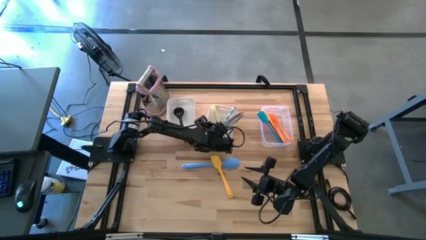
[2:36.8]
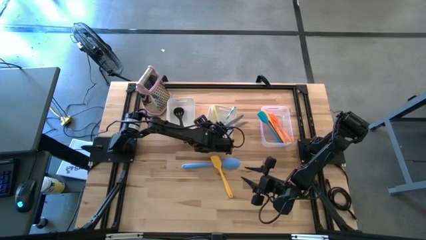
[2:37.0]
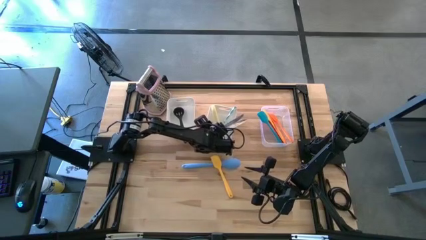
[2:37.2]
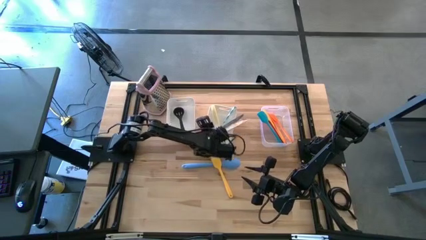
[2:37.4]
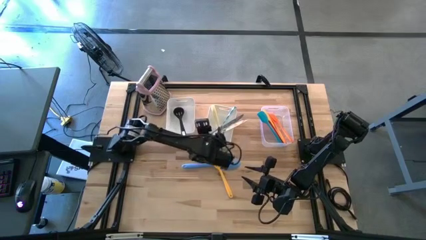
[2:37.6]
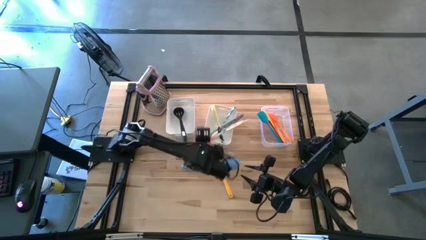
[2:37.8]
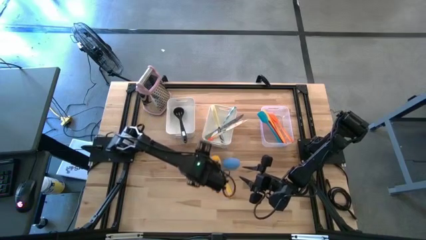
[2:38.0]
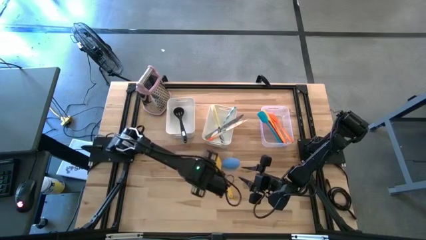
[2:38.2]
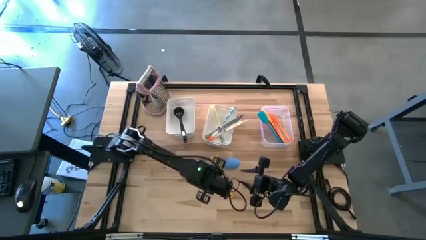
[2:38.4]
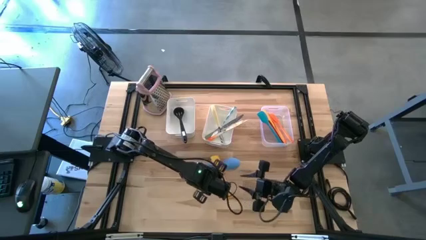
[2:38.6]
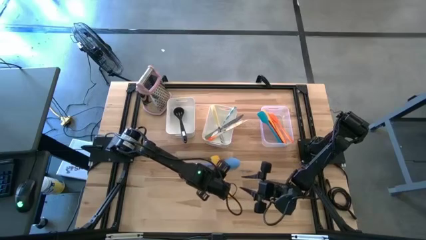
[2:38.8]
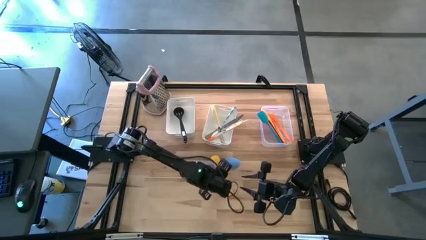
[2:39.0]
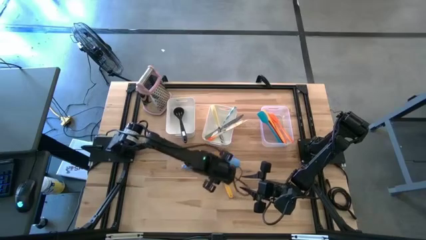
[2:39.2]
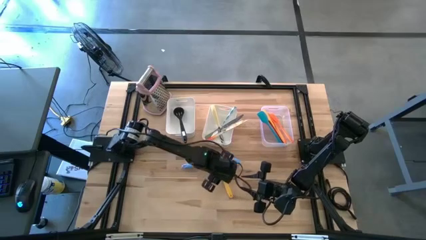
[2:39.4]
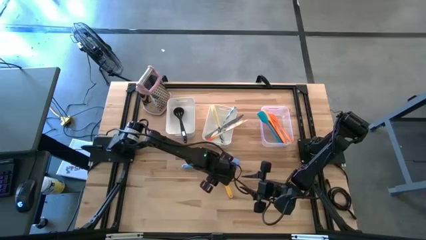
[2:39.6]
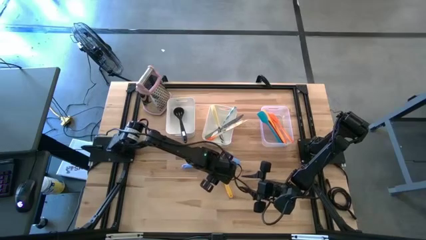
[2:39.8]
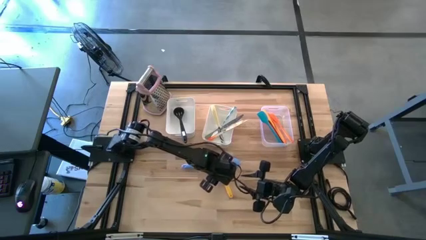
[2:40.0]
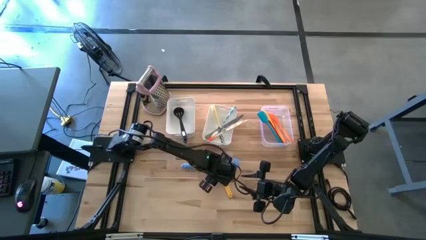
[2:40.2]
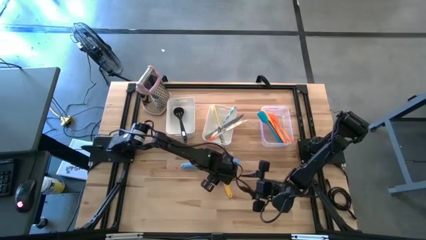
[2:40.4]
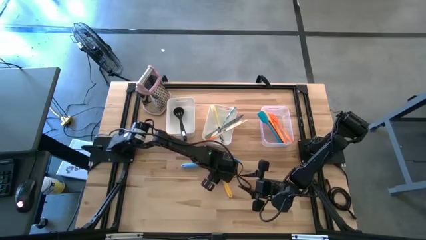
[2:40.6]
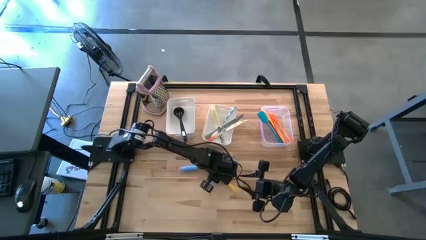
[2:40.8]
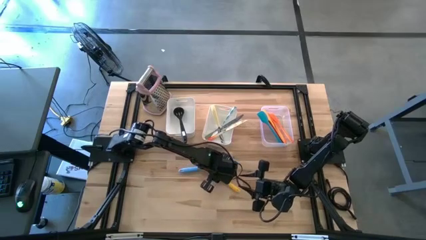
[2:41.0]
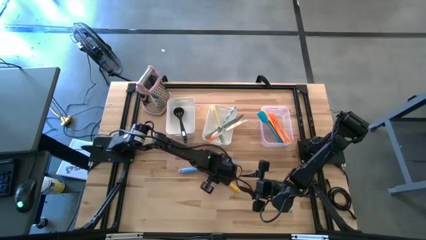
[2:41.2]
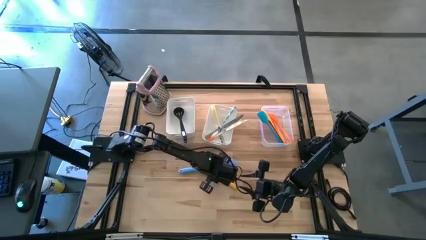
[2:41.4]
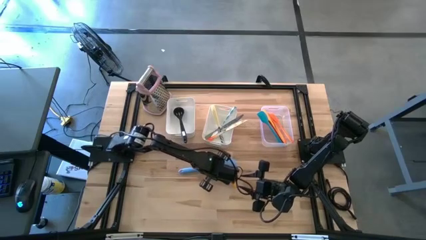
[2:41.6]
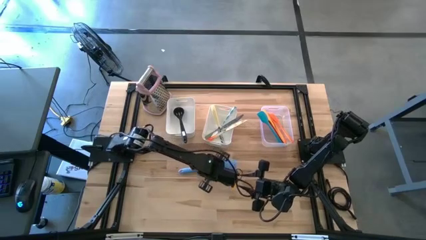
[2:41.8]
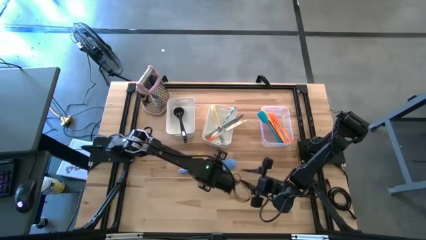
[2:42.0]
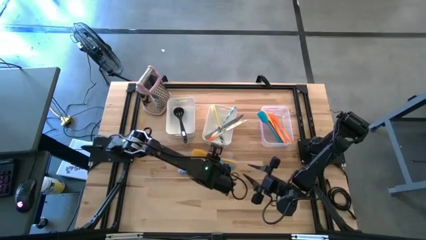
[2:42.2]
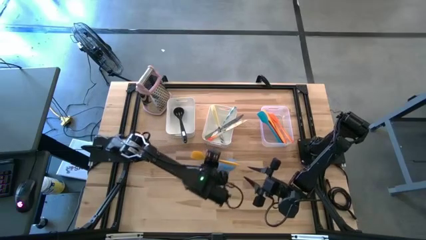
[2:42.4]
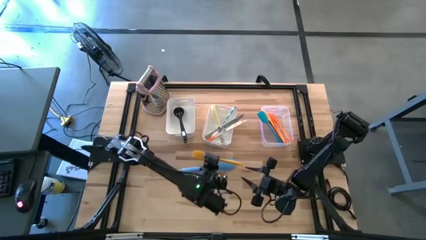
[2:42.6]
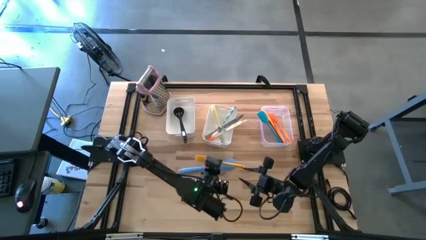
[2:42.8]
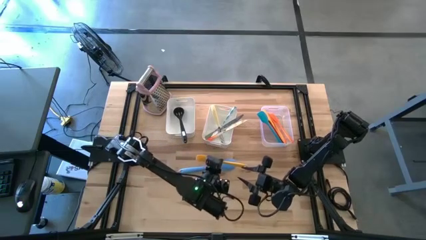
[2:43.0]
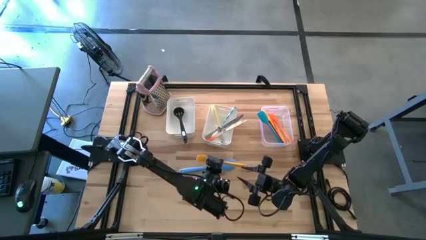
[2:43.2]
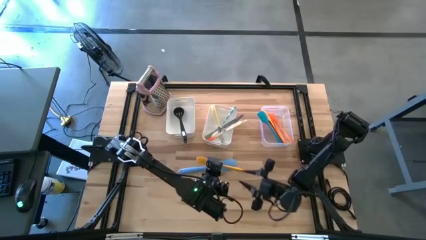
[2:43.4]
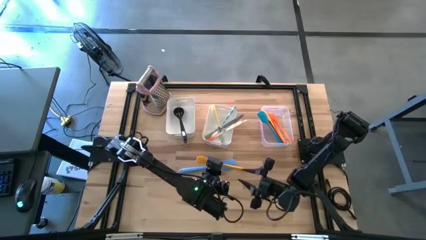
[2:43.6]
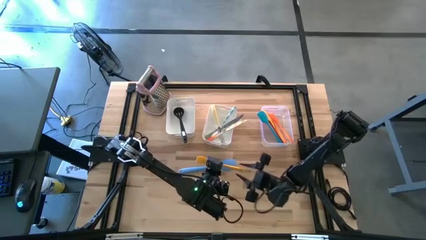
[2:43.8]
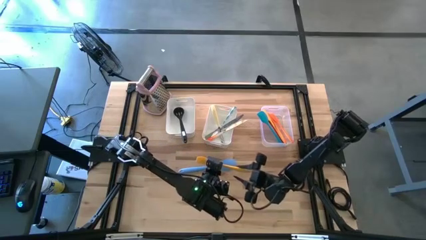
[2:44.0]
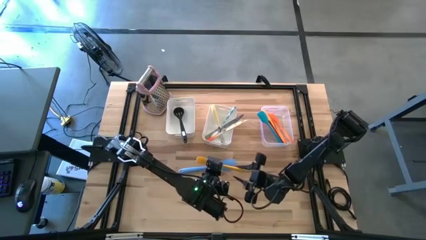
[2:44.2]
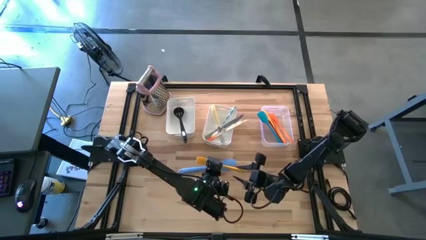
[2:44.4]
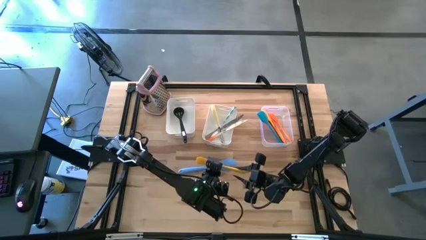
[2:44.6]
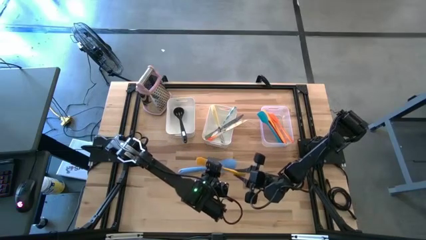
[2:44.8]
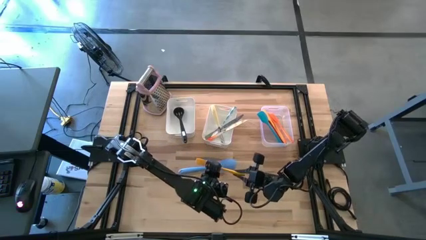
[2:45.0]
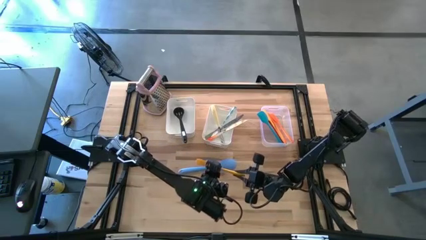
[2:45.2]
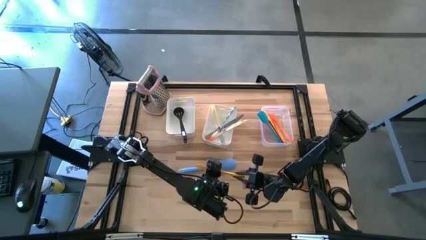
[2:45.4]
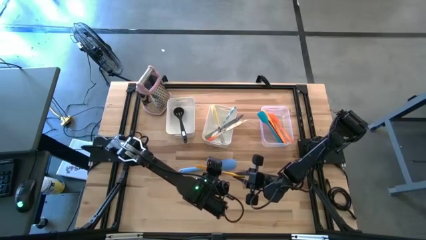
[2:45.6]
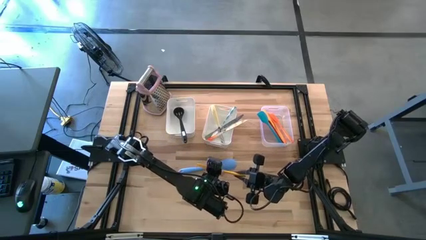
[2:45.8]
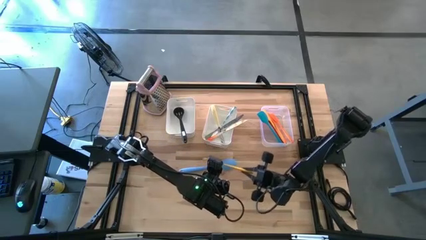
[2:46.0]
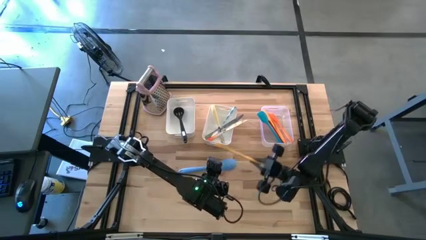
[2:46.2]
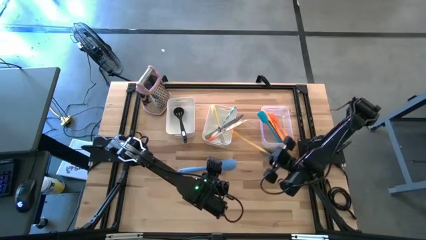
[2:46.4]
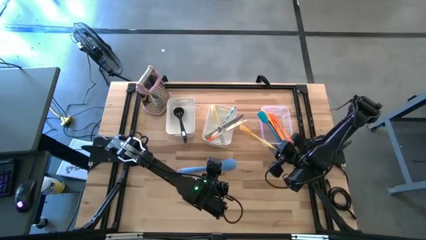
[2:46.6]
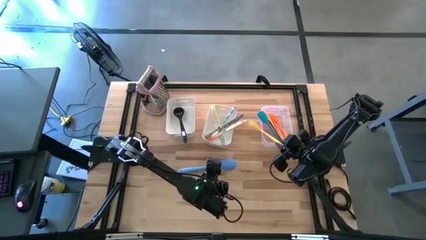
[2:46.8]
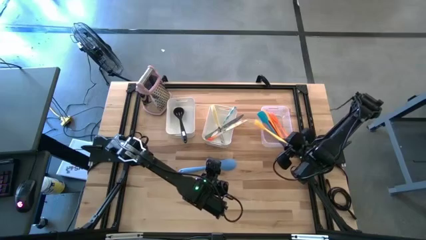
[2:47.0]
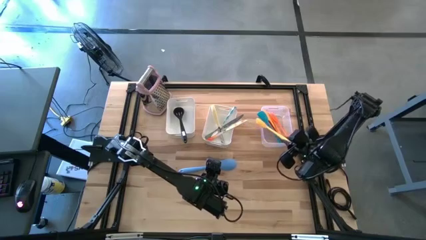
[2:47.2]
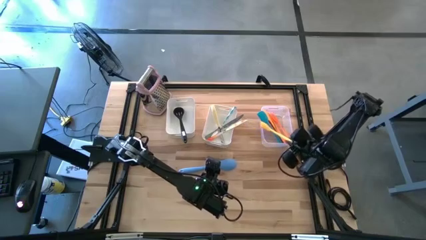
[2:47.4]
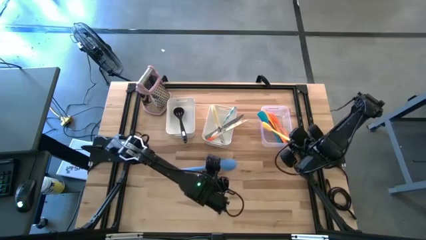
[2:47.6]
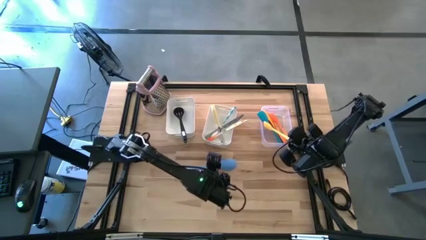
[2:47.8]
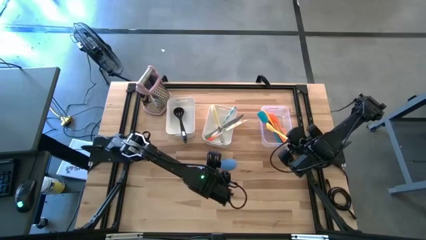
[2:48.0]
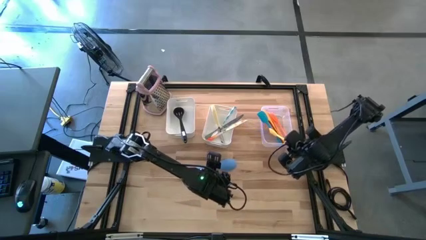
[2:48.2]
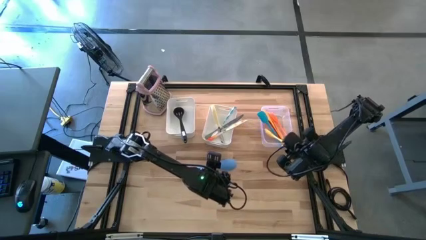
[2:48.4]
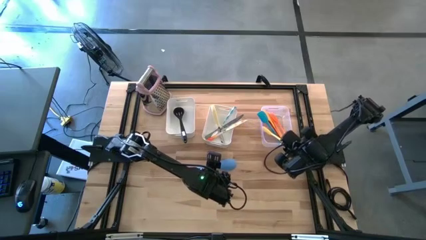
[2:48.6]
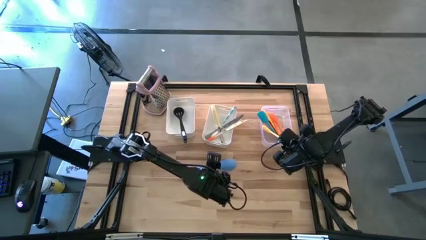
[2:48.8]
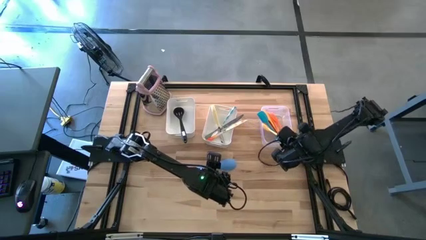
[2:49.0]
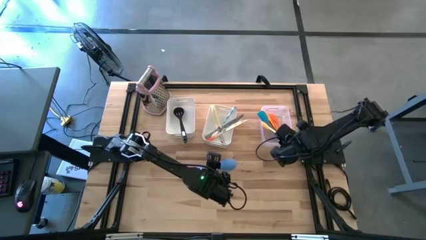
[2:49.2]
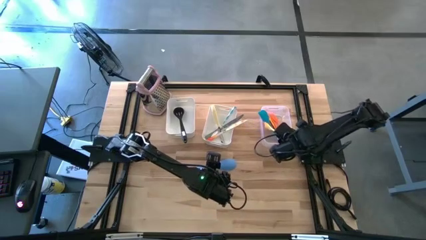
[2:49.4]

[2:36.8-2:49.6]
Task: Pick & Place Kitchen Items
Put the yellow spatula into the transparent bin
